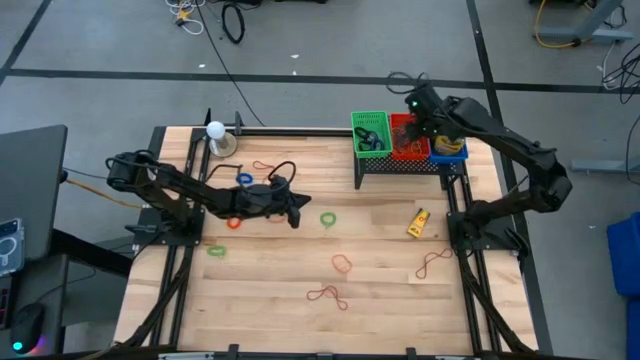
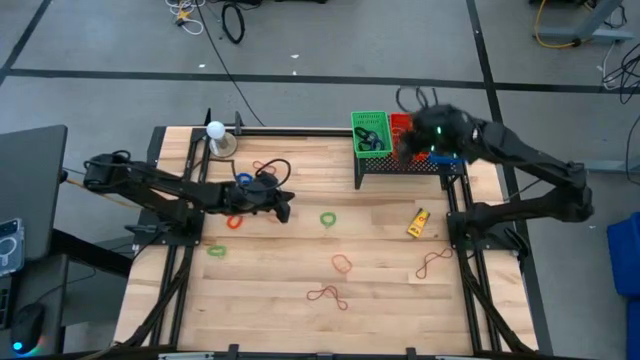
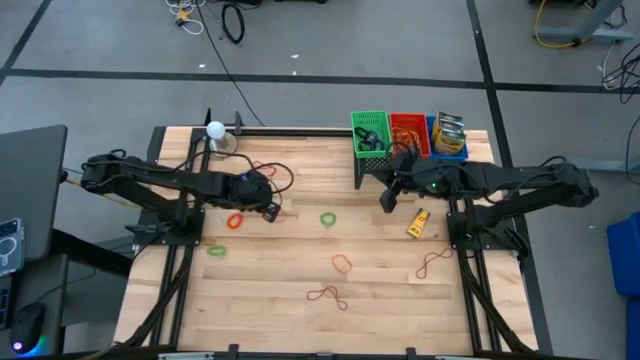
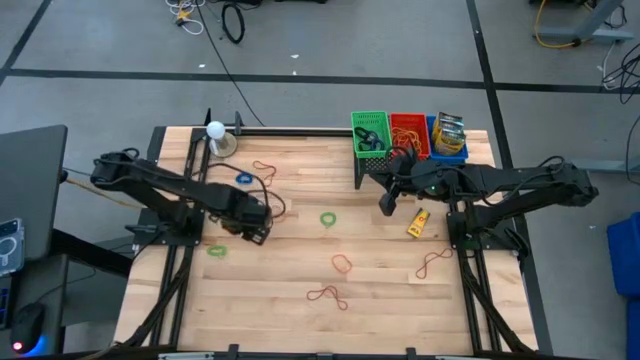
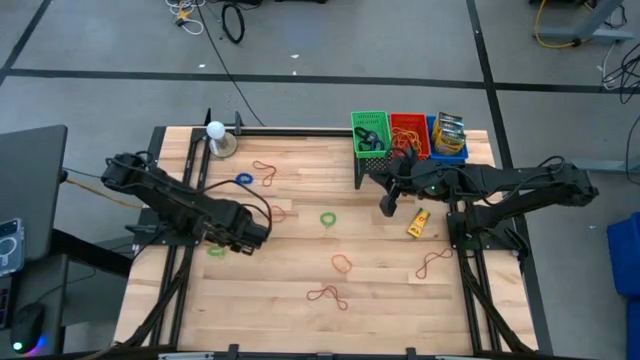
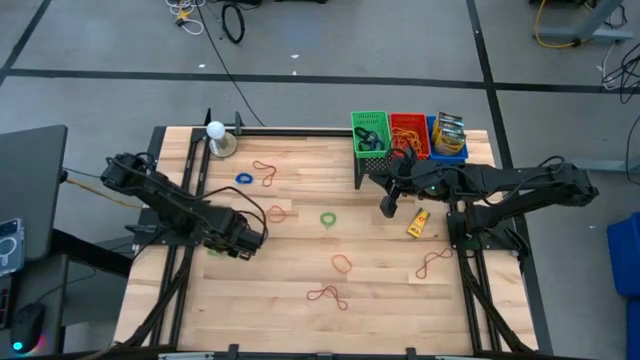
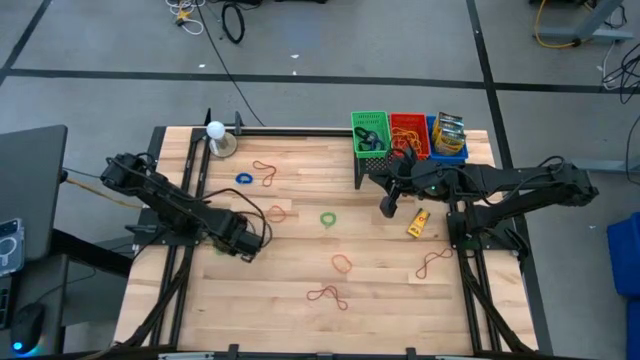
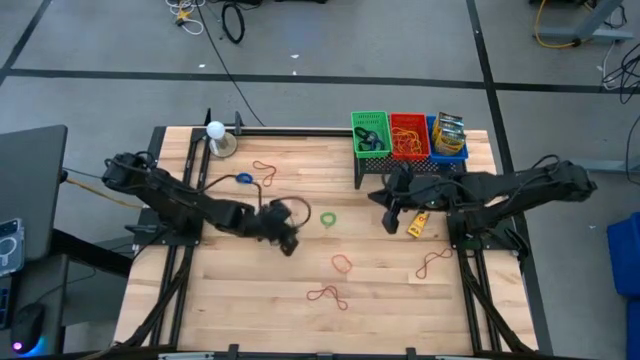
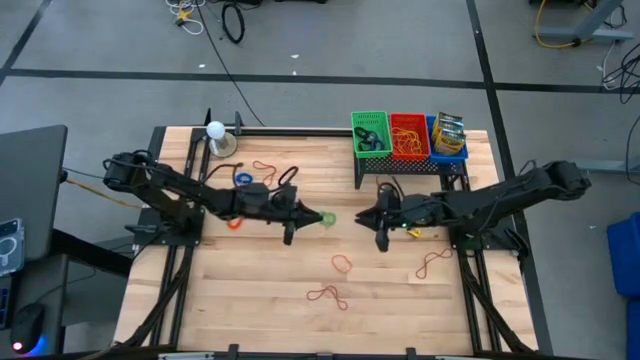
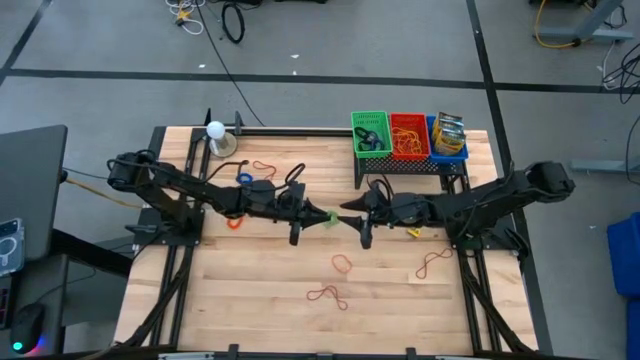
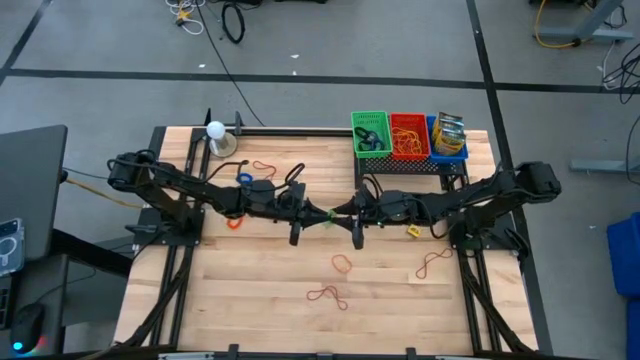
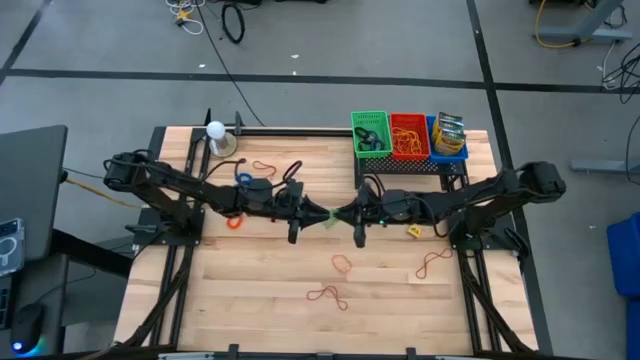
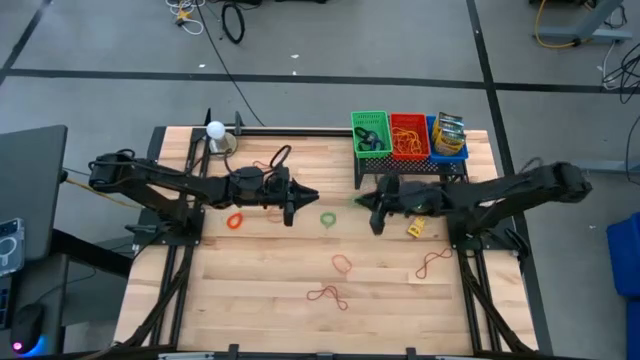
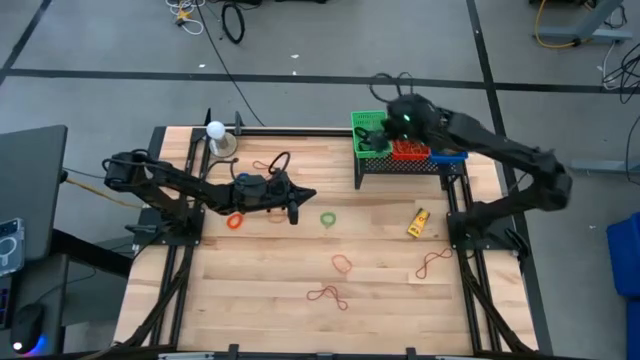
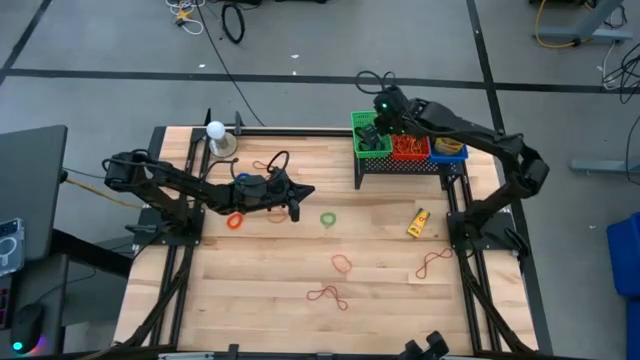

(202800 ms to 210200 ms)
Task: Pick & Place Office Desk Supplies
Put the green spring keychain into the green bin

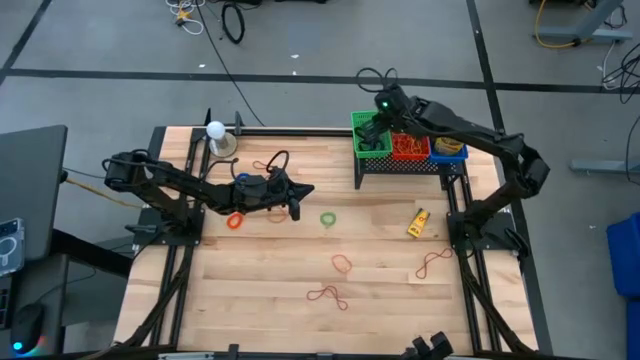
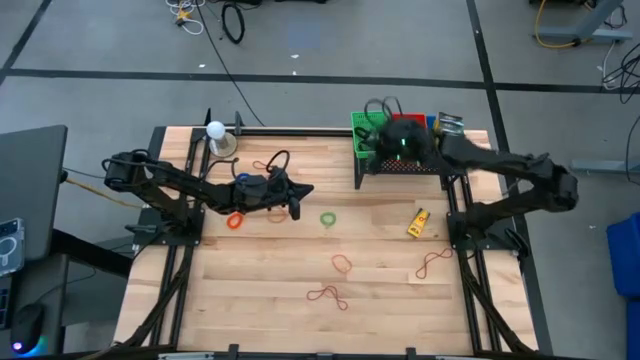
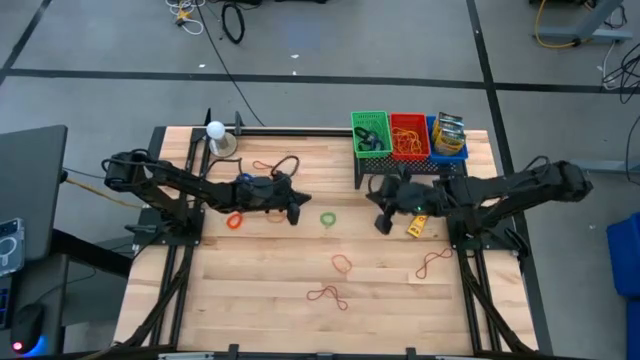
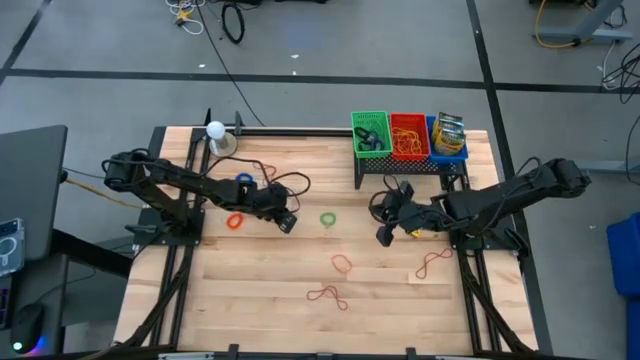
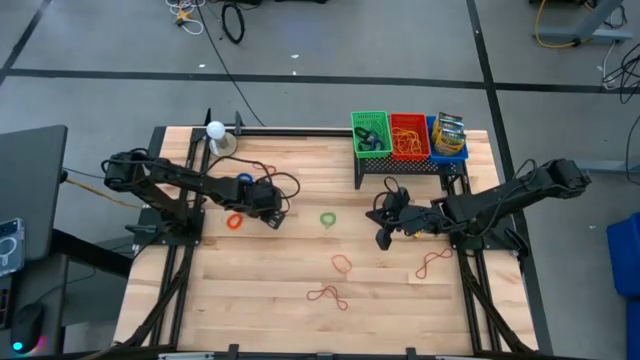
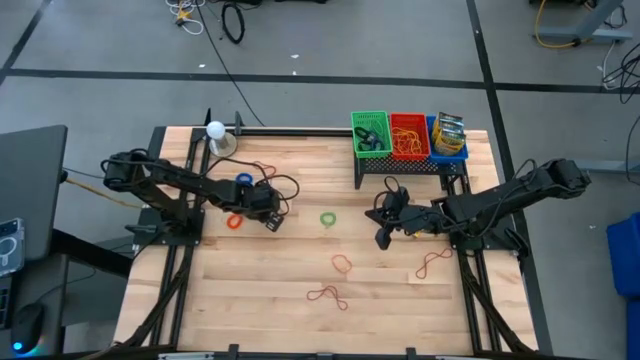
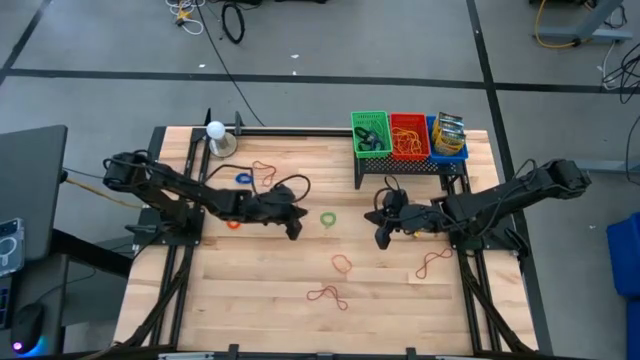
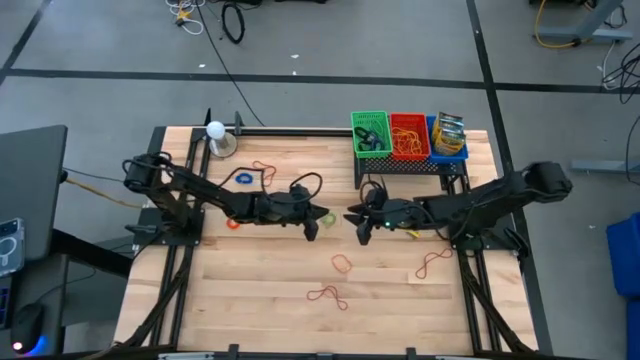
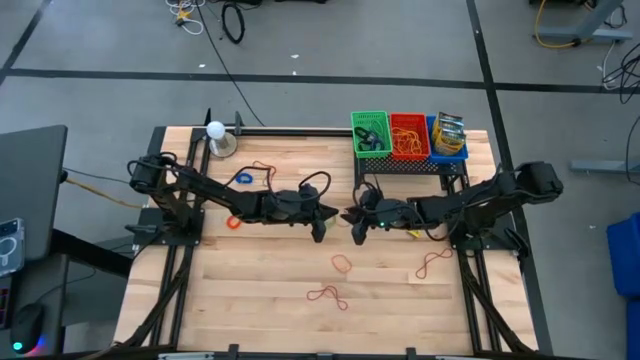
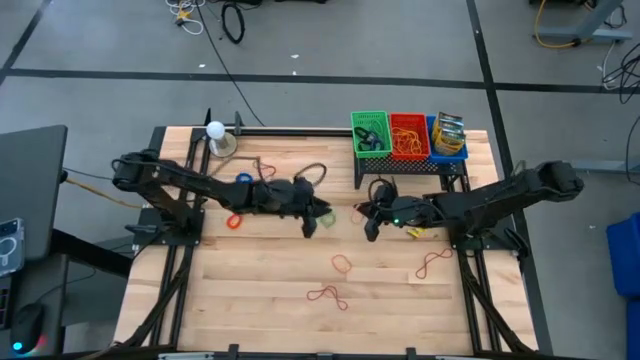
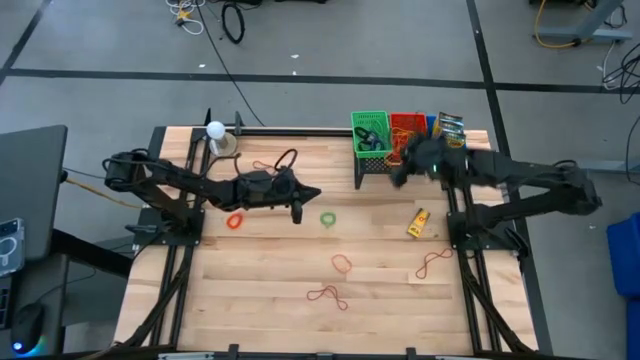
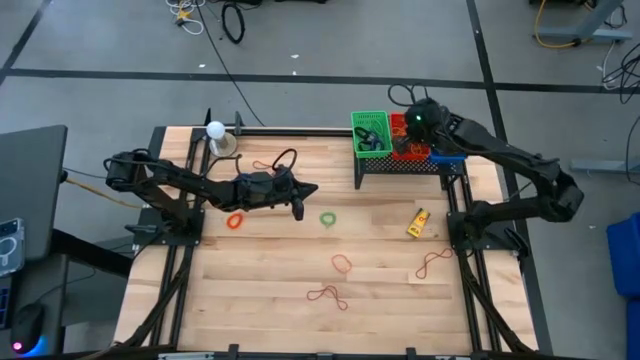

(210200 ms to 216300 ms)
Put the orange rubber band into the red bin

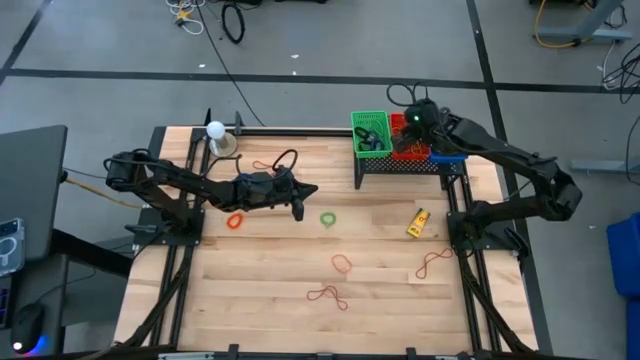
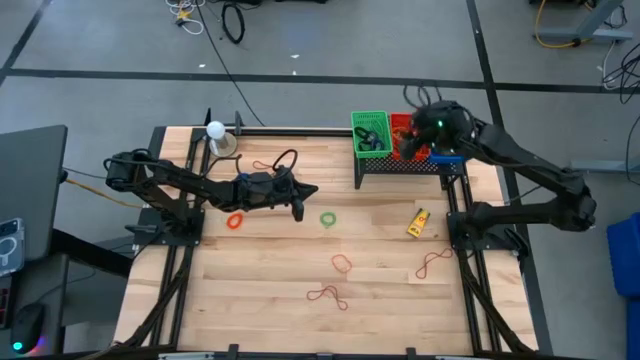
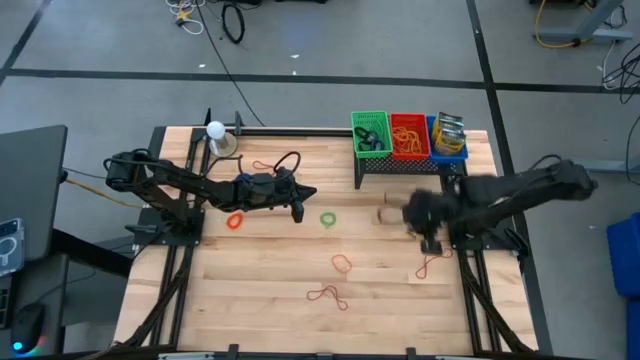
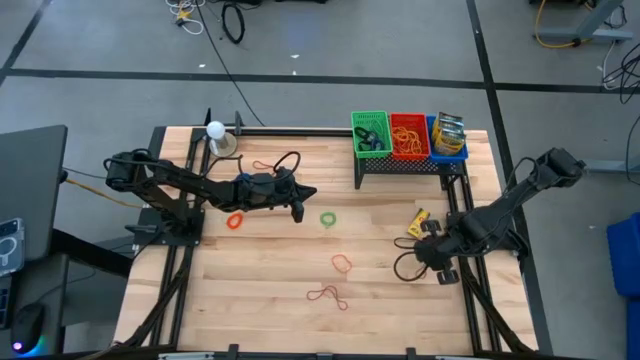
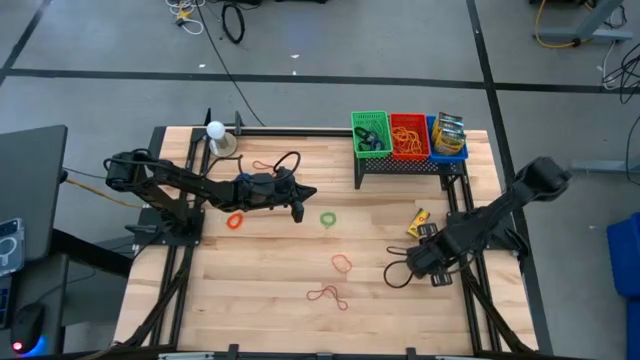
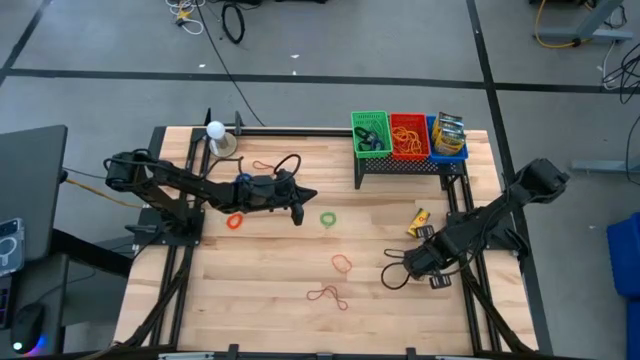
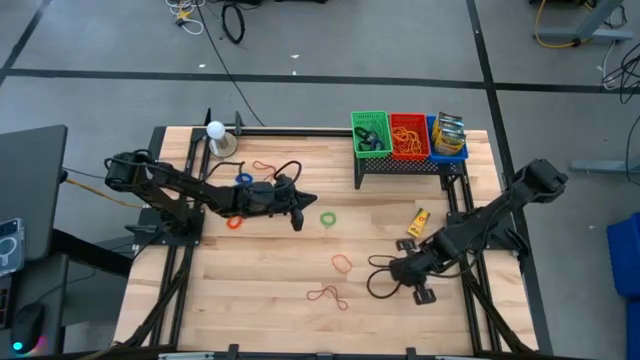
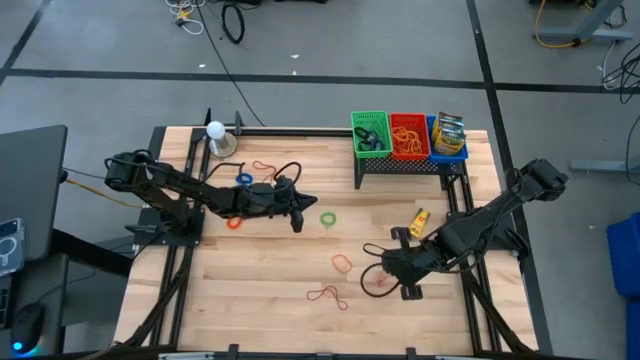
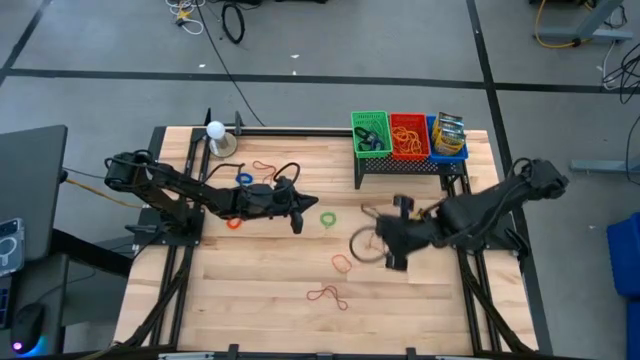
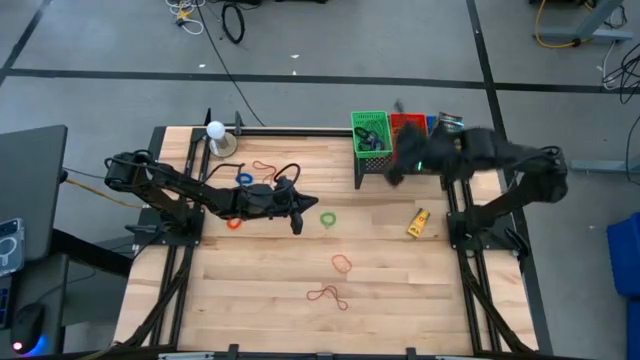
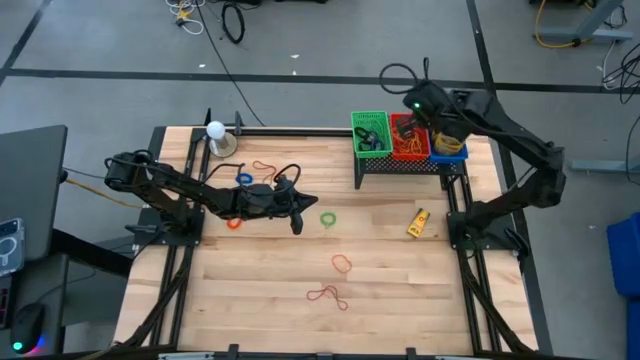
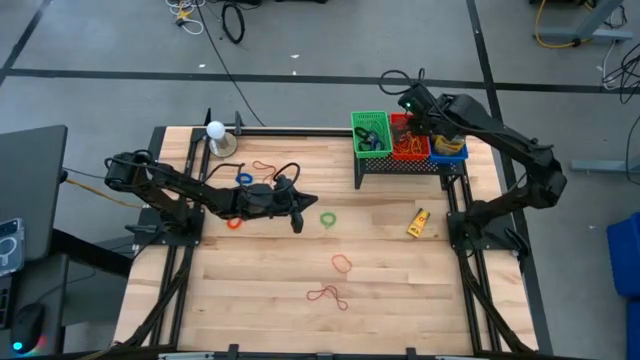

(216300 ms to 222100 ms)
Put the red rubber band into the red bin

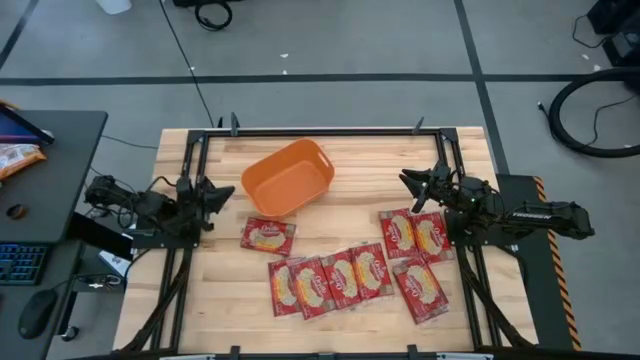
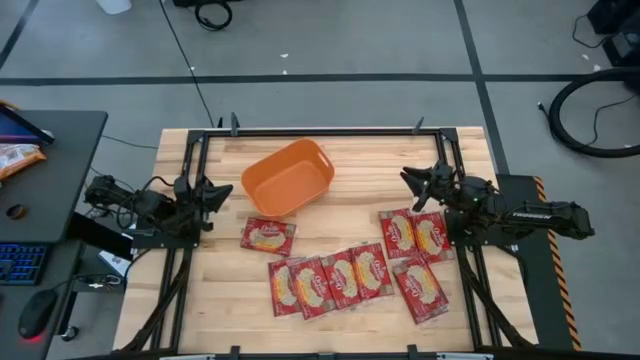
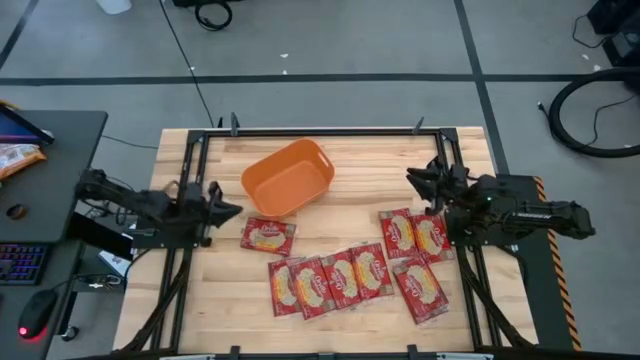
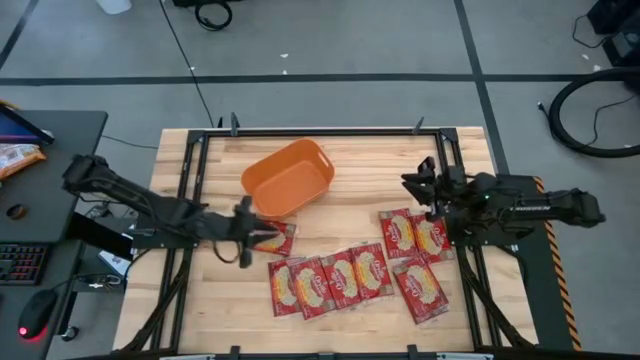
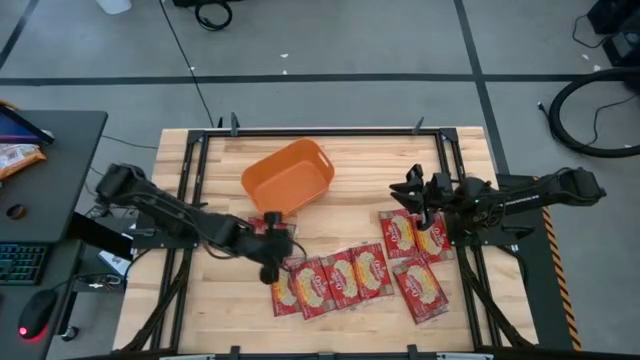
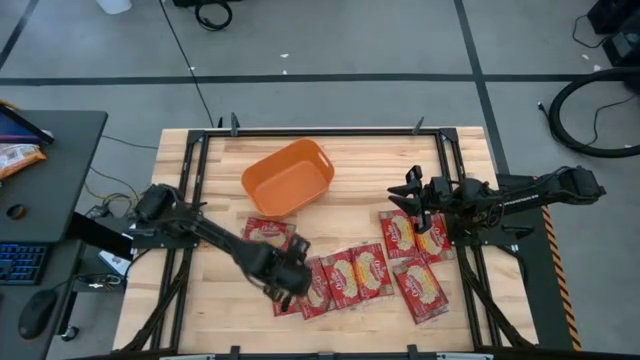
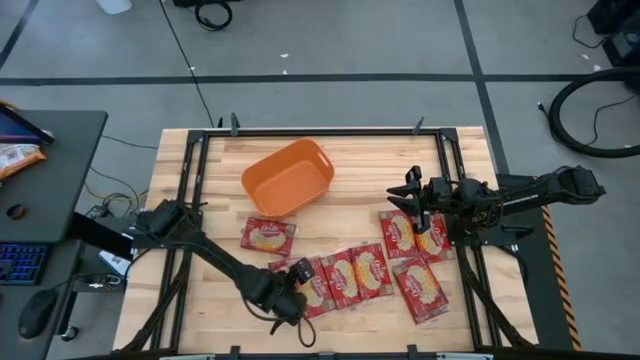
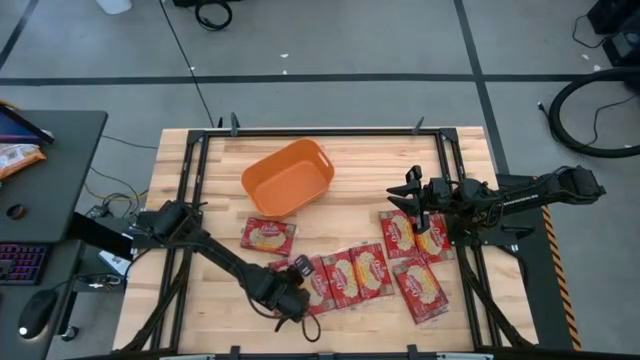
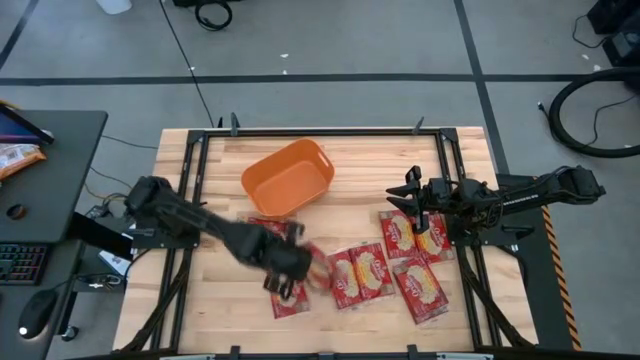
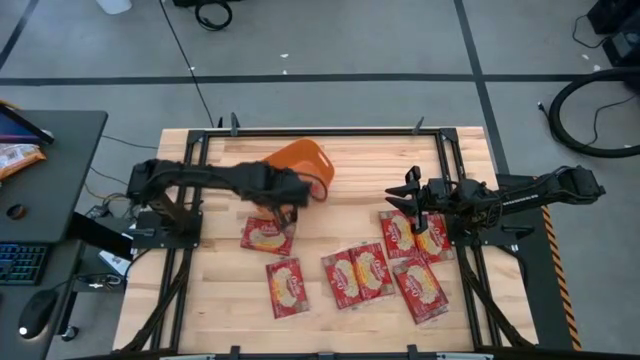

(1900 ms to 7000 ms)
Task: Sort popcorn bags into baskets
Put the red popcorn bag into the orange bin
